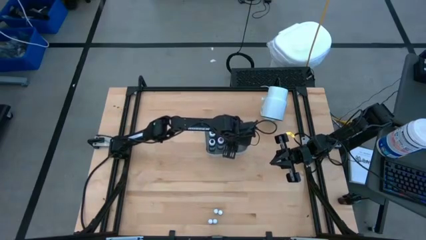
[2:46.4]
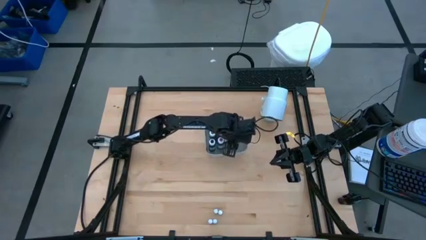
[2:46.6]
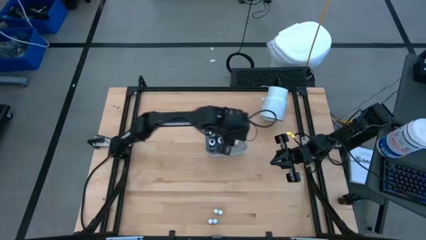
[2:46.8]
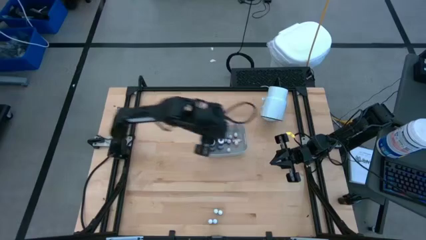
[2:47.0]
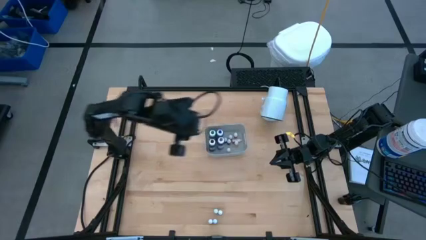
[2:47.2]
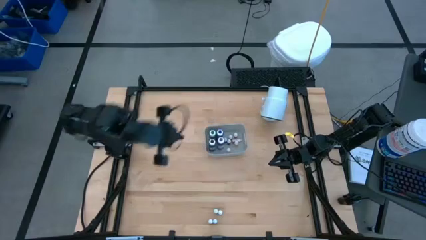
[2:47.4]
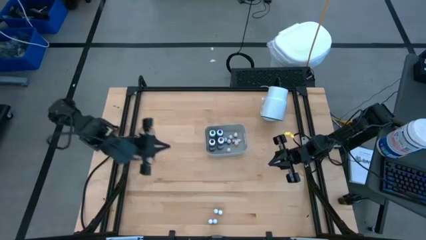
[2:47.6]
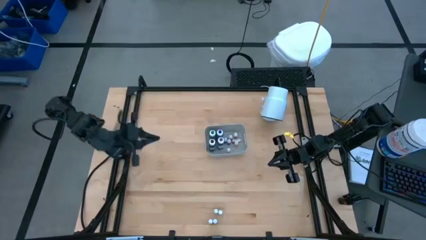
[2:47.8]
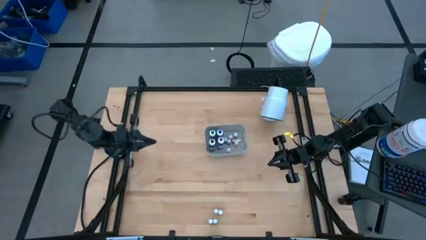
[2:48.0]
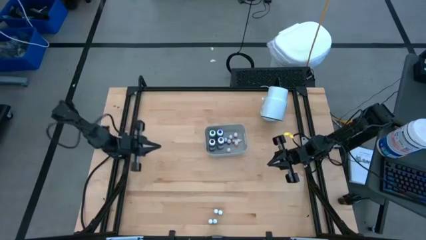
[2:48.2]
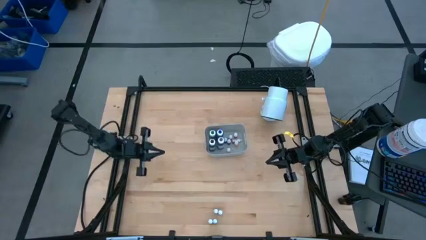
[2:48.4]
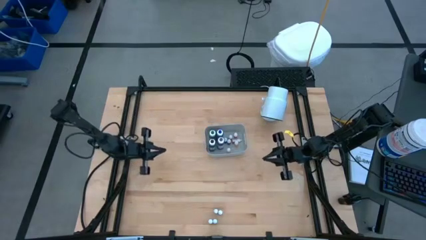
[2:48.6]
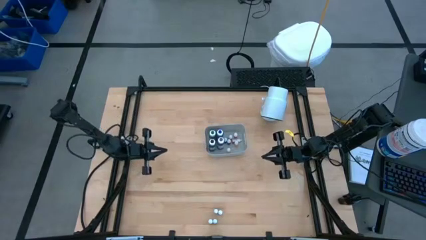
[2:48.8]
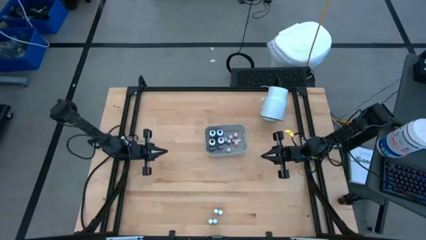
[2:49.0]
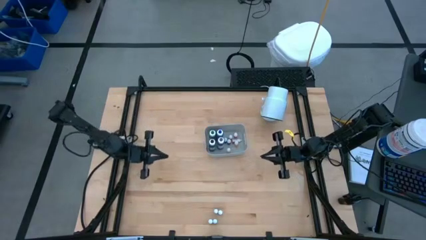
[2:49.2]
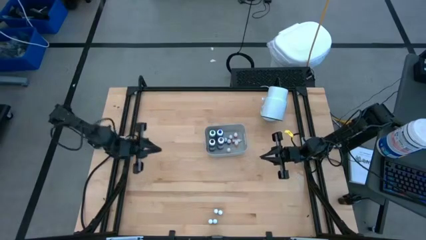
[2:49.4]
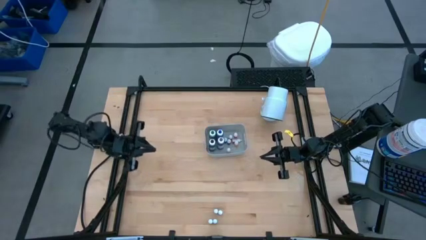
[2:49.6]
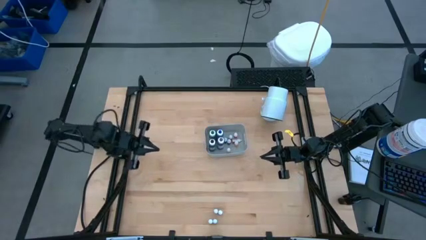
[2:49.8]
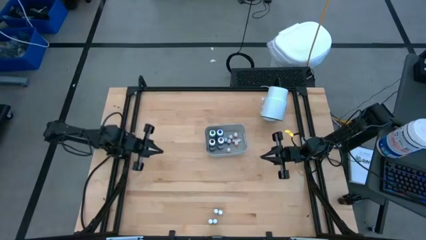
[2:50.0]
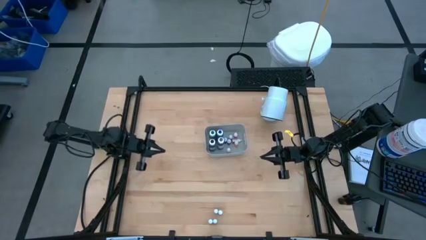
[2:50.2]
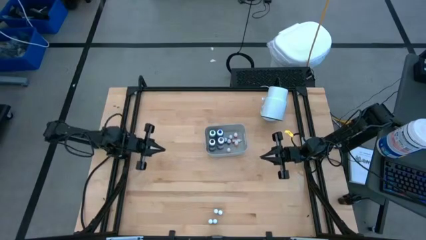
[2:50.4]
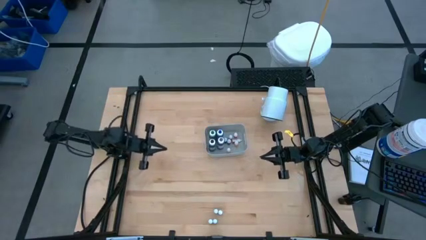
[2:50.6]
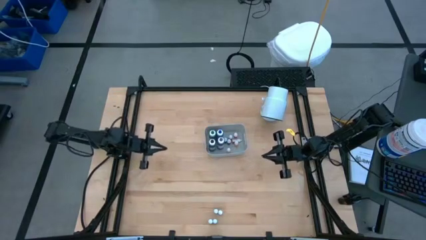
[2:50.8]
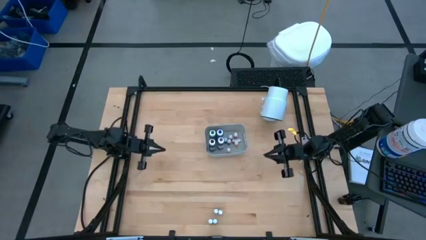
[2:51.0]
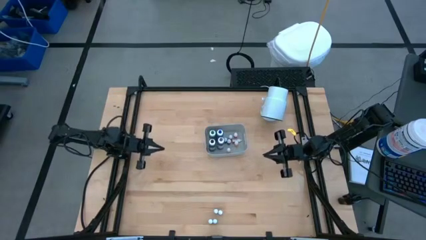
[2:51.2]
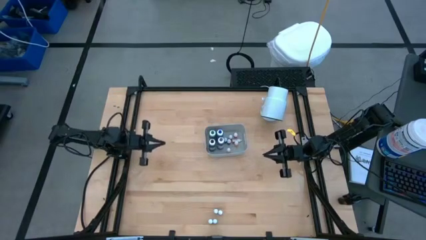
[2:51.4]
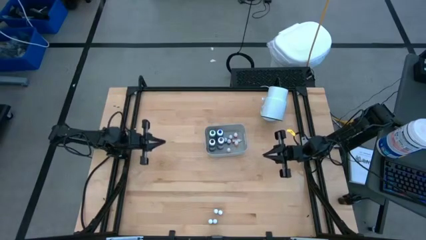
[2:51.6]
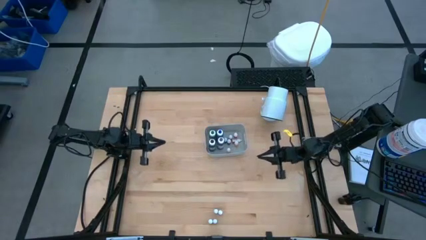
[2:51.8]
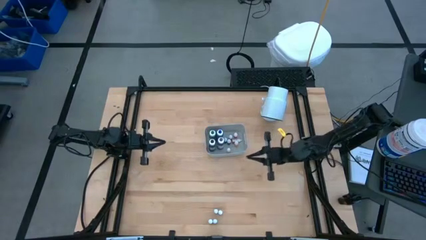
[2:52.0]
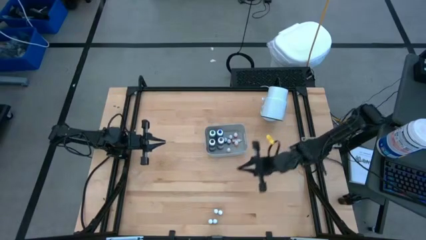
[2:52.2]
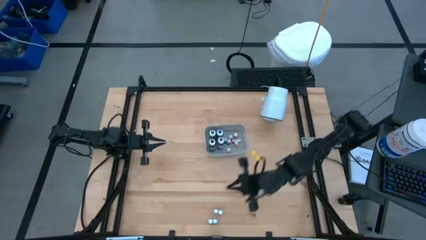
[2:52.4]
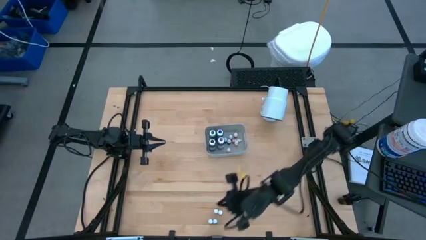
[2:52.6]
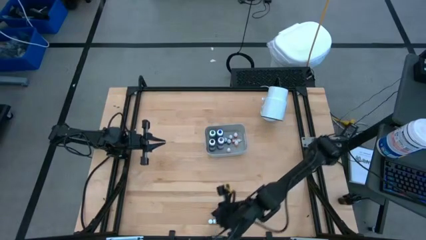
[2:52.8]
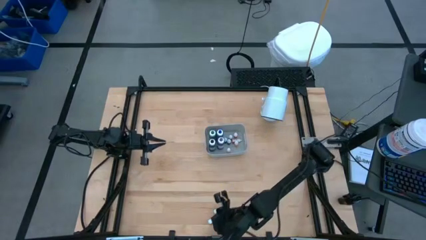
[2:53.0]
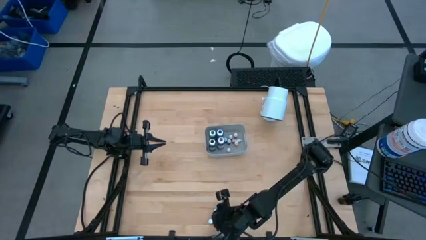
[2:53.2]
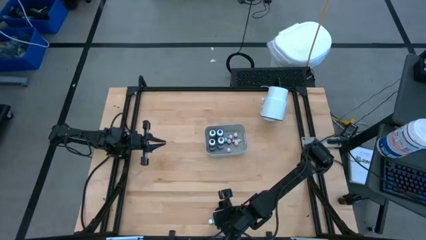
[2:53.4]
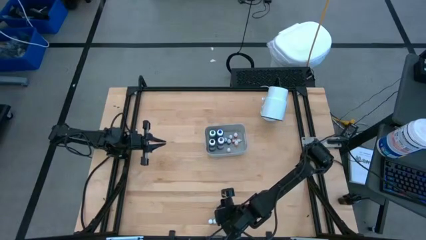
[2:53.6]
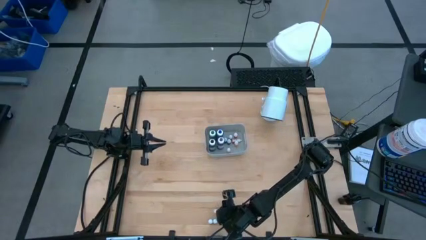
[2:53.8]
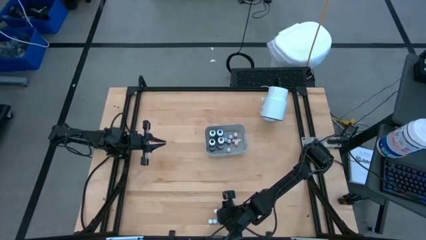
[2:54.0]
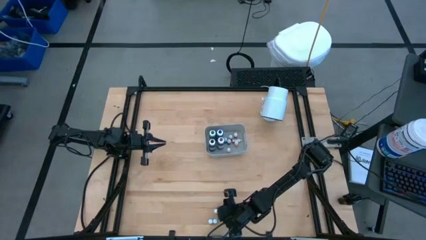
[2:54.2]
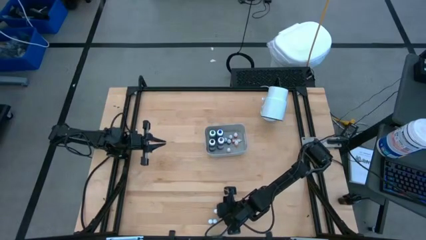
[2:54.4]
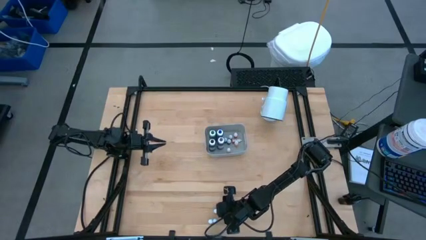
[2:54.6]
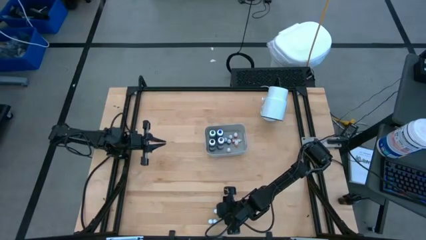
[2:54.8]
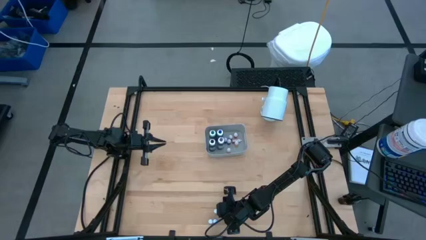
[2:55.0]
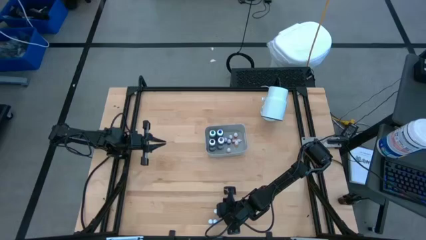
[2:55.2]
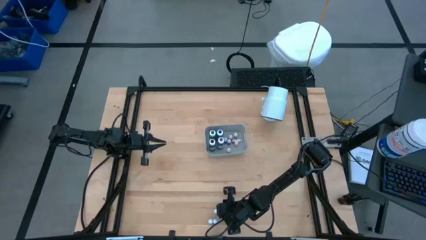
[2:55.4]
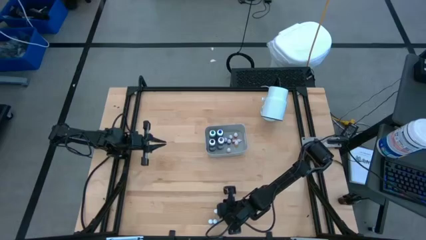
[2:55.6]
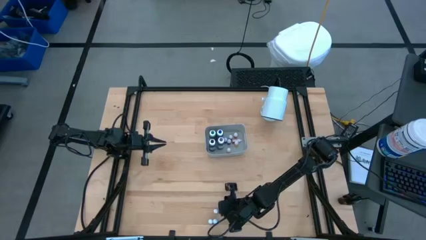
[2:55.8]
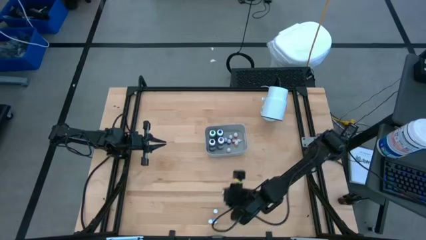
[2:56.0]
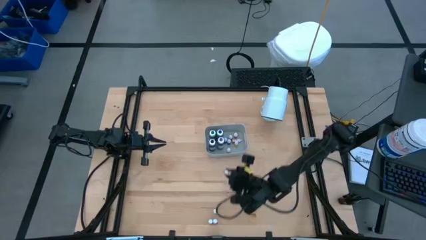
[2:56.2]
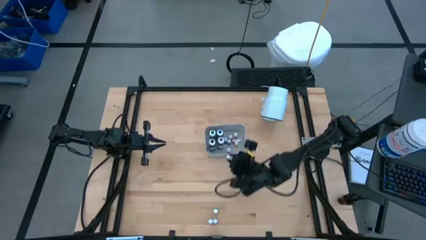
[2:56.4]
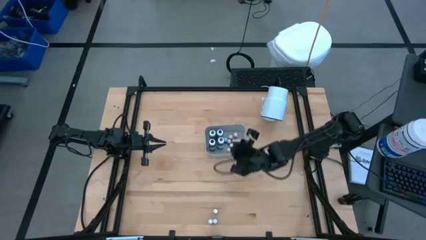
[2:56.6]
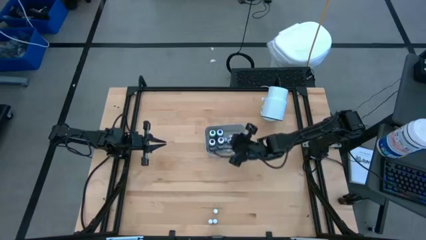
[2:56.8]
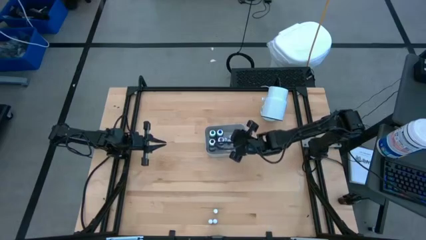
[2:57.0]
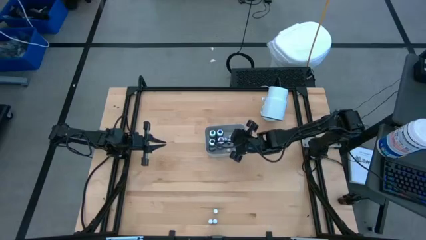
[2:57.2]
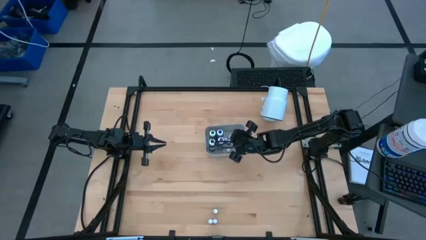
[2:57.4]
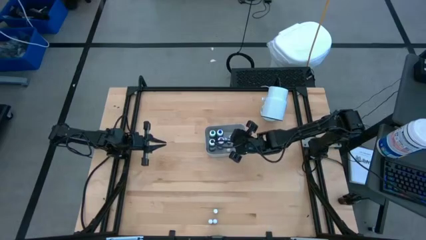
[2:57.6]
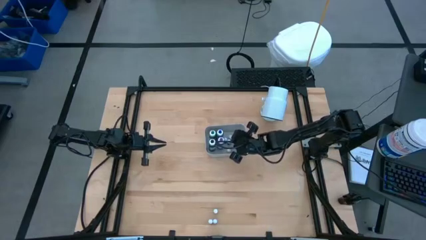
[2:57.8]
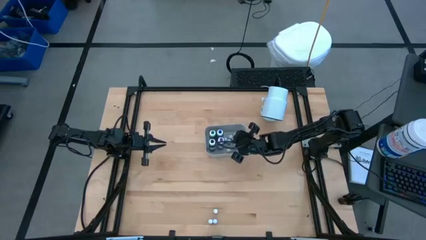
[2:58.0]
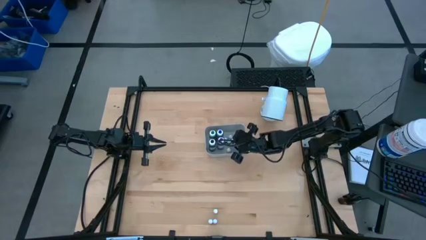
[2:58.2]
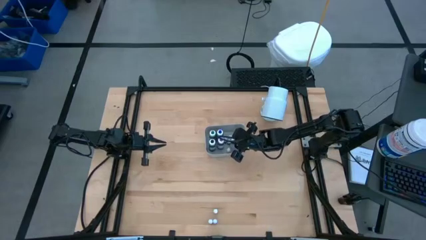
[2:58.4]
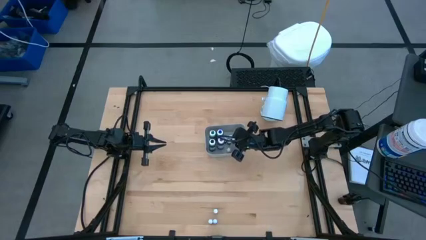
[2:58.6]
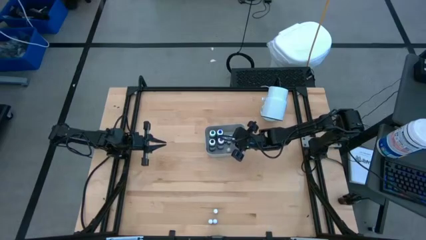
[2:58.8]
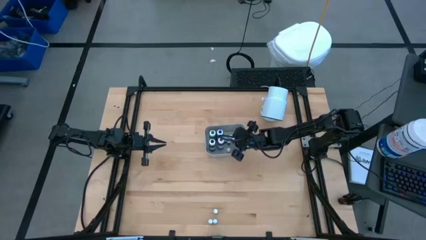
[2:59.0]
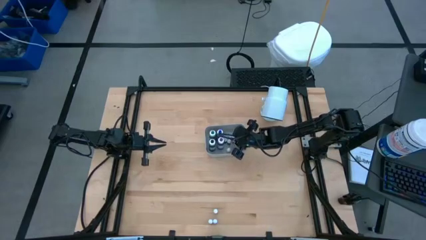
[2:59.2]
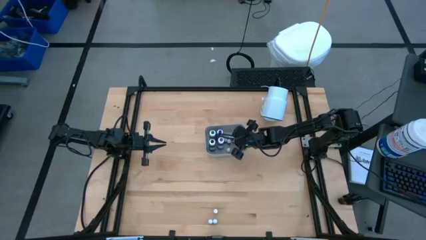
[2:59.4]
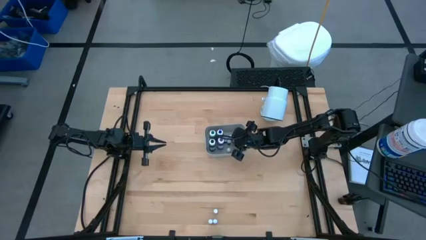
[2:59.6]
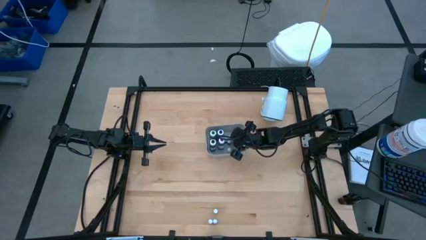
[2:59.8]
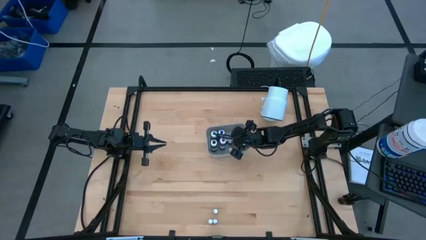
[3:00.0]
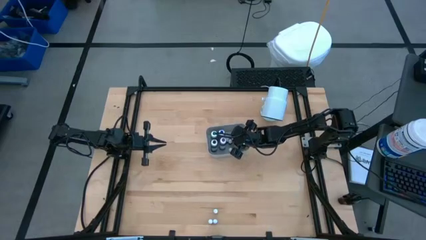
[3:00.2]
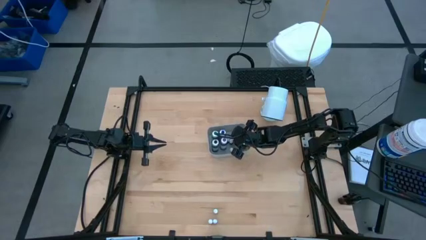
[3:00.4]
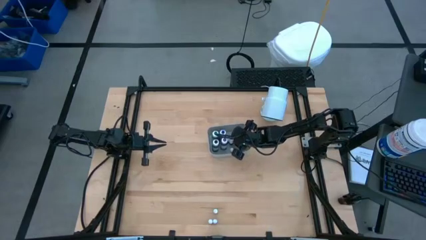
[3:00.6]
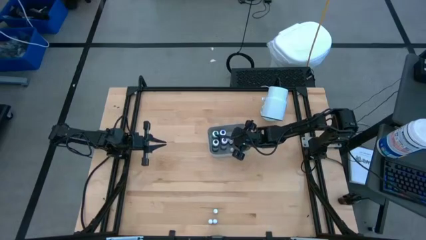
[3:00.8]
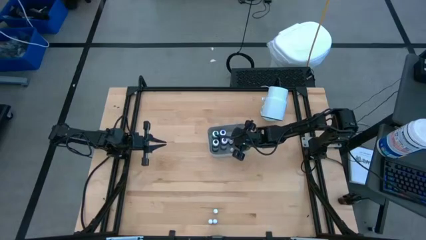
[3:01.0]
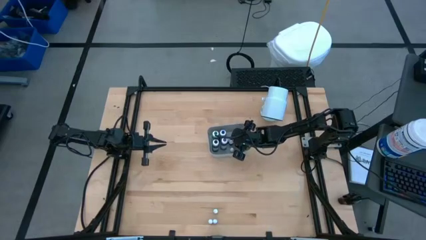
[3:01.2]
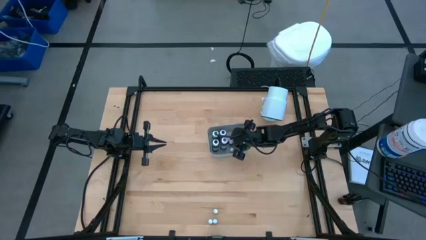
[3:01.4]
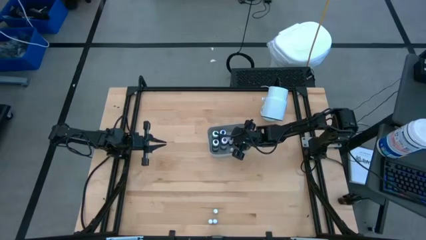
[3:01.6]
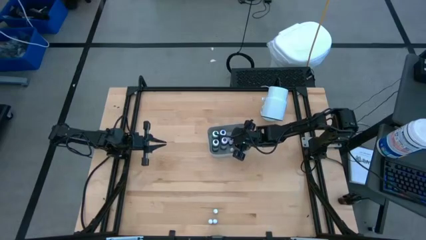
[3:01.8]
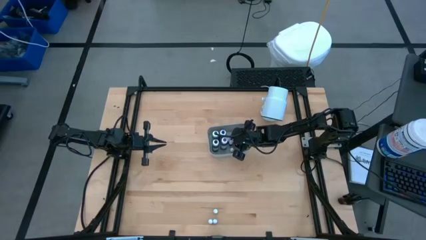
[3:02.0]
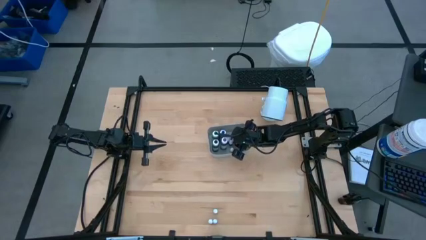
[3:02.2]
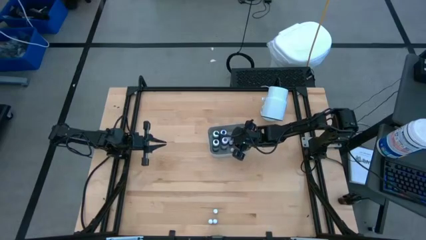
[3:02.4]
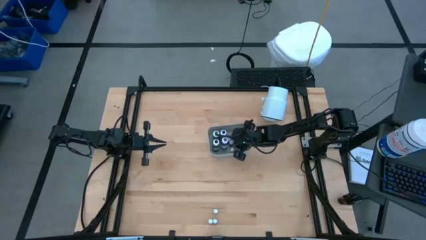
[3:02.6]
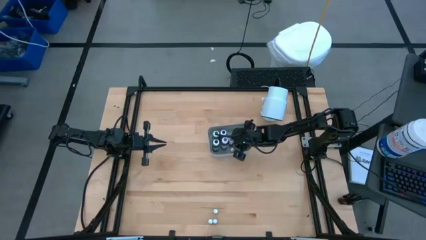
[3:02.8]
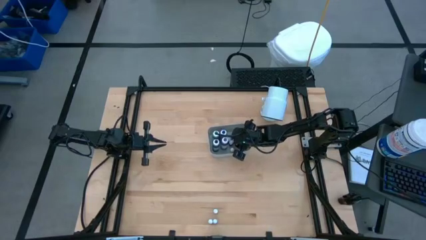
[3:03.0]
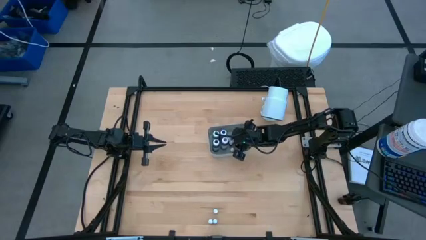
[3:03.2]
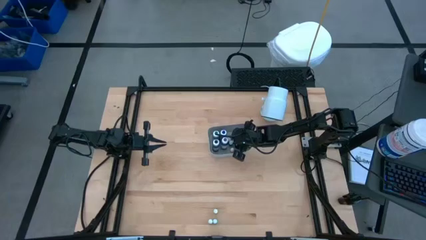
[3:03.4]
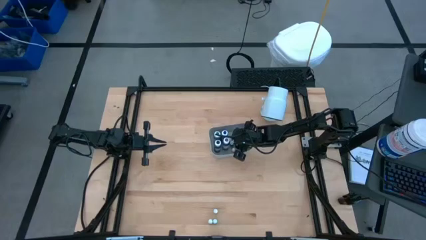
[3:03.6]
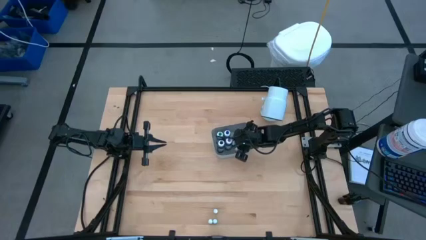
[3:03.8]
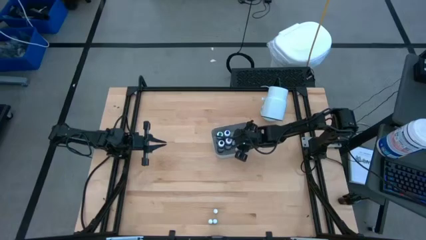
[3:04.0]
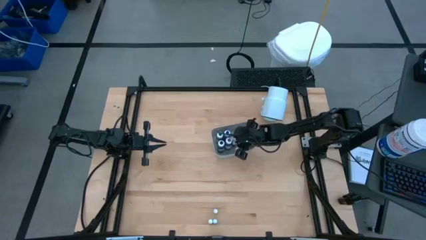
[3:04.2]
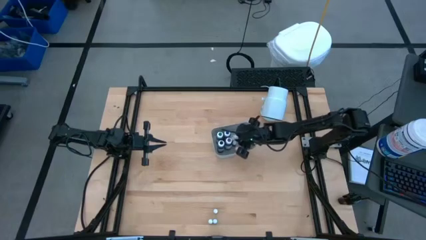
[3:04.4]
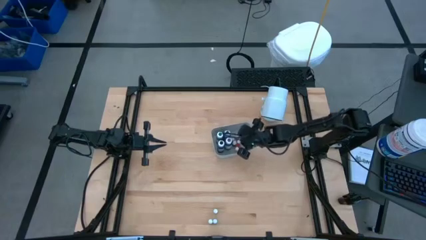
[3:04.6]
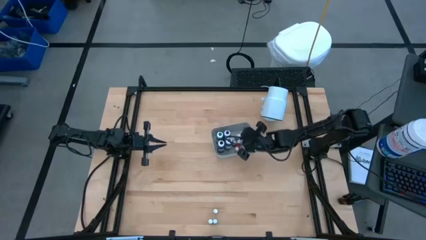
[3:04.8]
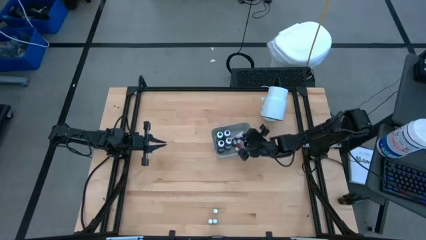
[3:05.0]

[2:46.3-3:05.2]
Task: Pick & Place food coloring
Put the small purple food coloring bottle into the gray bin
